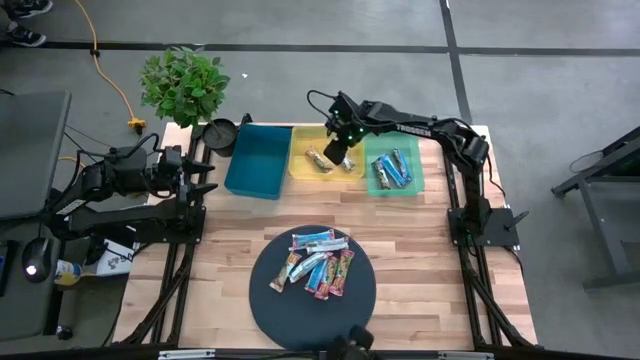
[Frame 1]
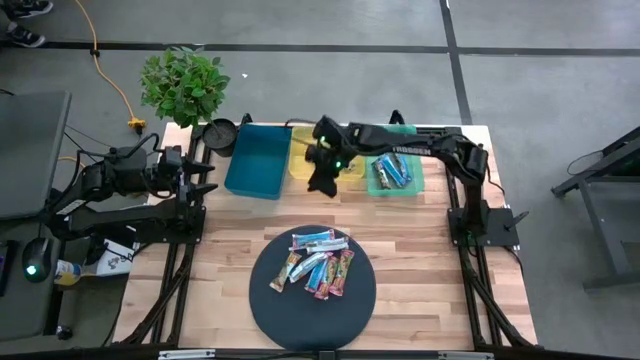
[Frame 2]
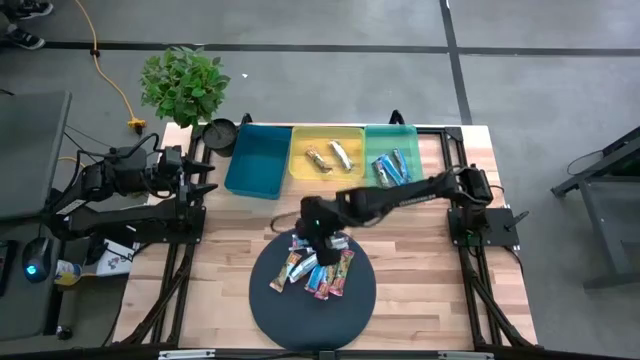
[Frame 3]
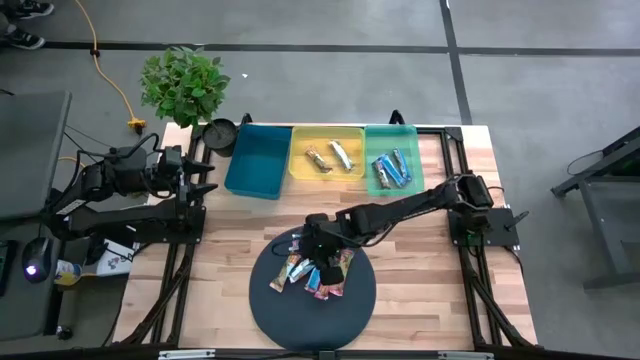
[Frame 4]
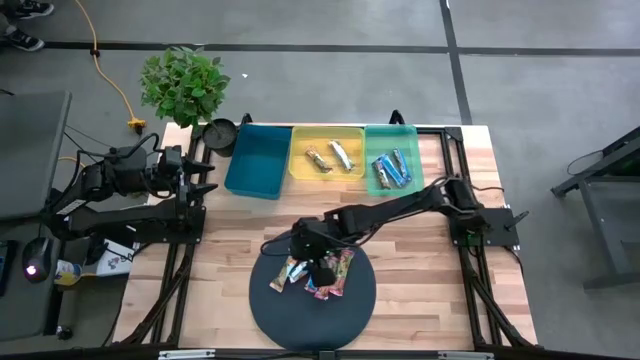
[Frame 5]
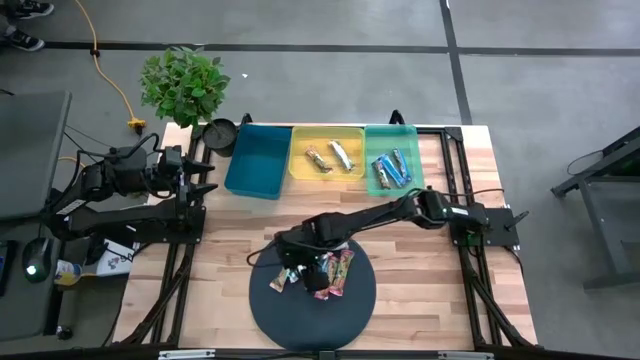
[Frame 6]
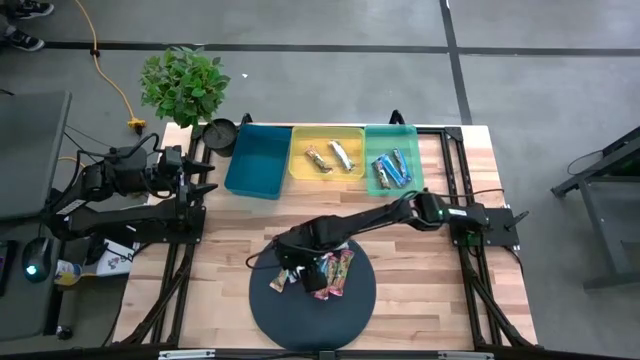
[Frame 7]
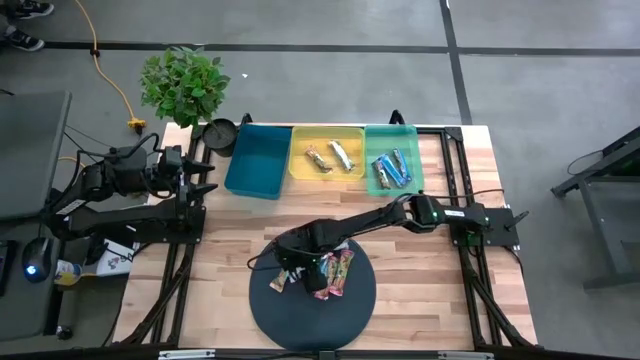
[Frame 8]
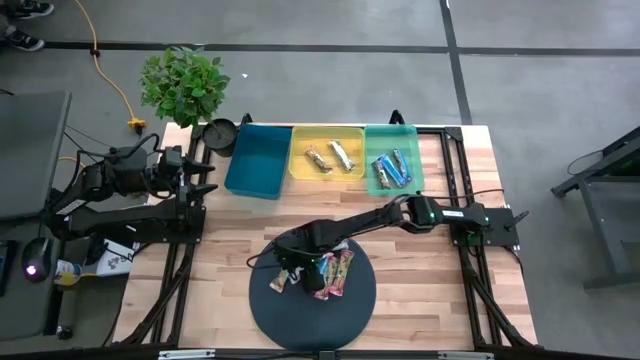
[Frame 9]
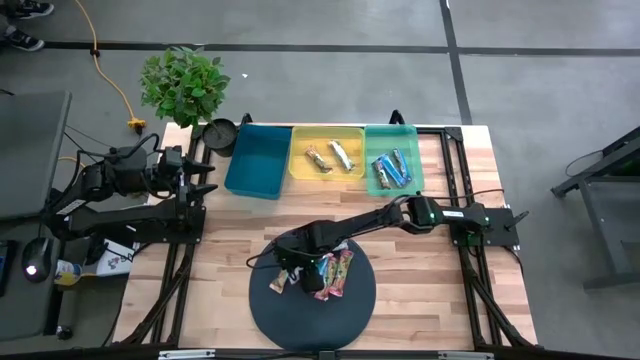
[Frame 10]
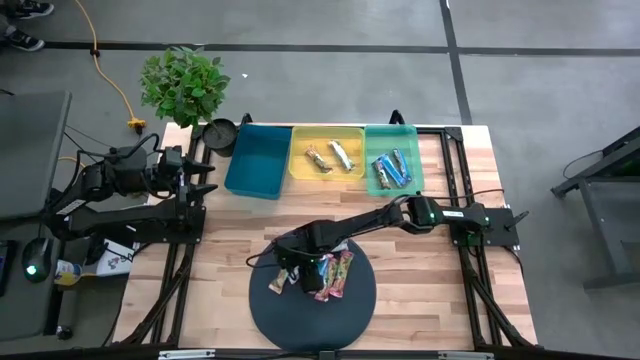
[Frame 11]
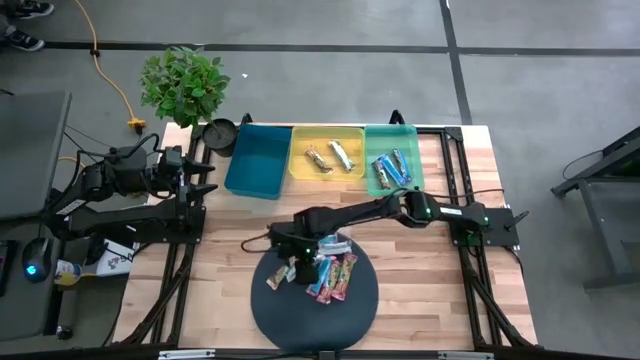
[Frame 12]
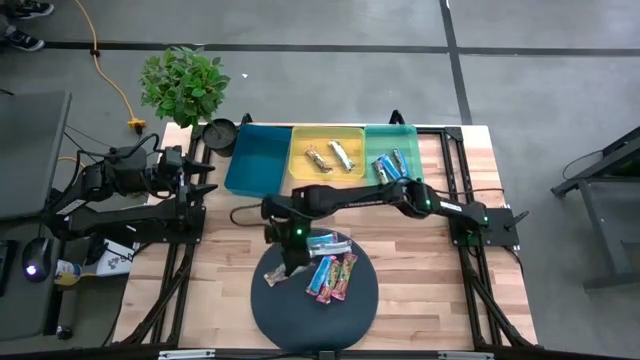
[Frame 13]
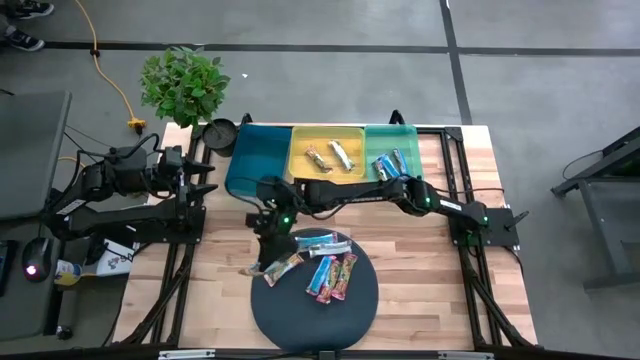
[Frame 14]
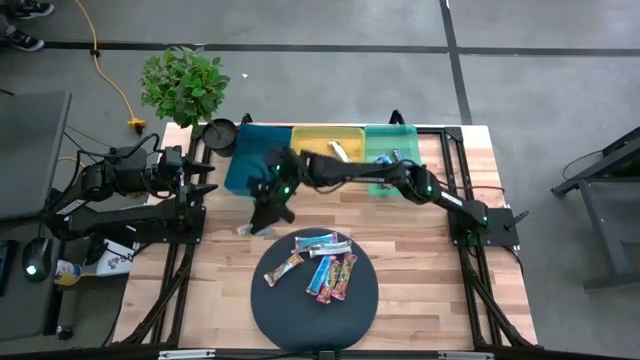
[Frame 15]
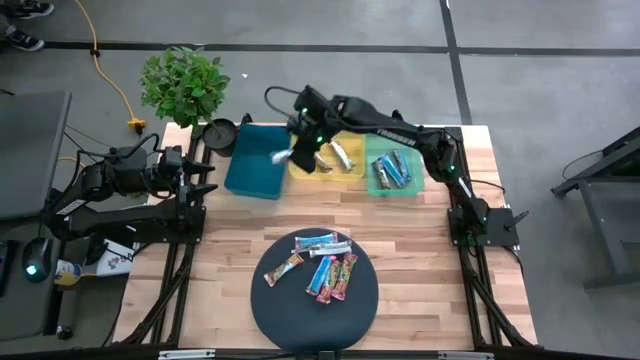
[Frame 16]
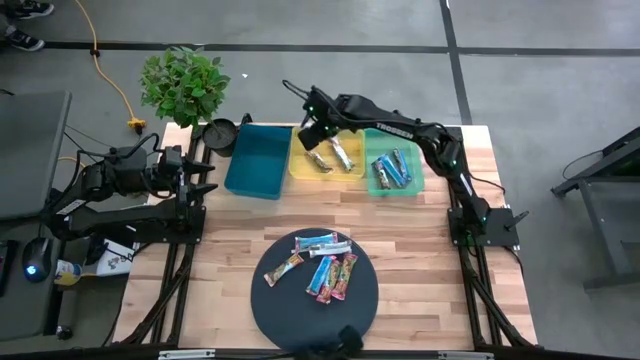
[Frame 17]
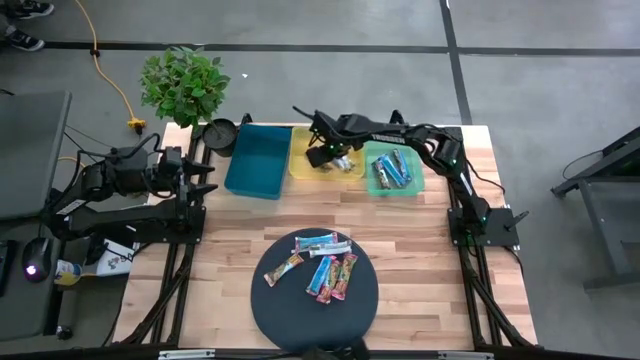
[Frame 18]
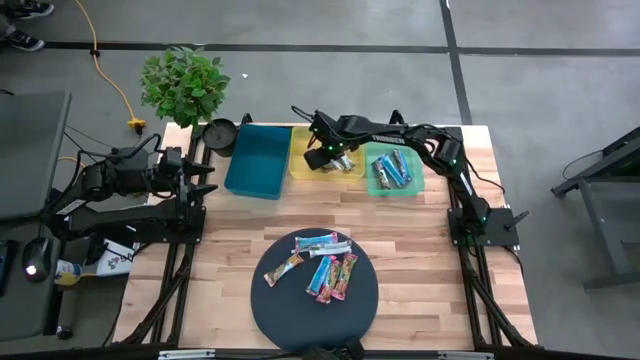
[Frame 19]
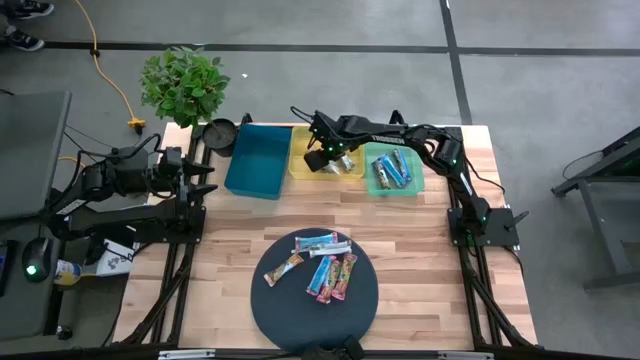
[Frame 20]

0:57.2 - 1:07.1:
Task: Pick and place Granola Bars by type
Put the yellow granola bar into the yellow bin

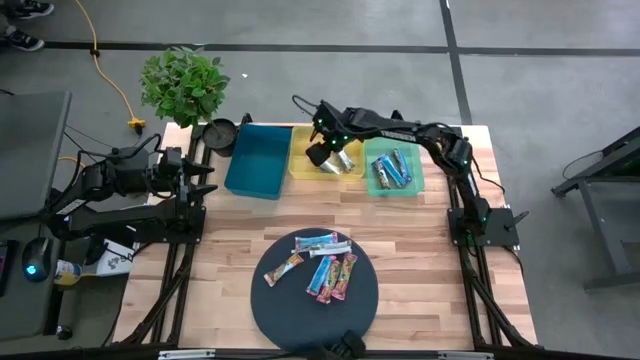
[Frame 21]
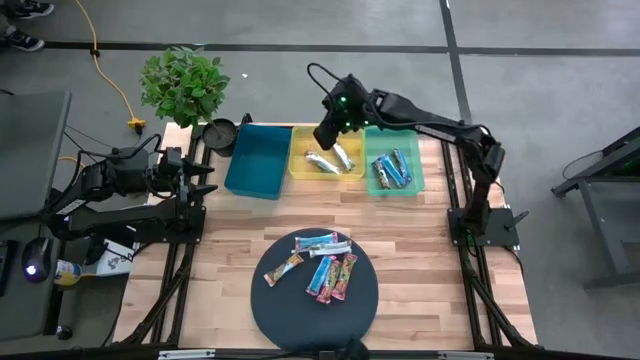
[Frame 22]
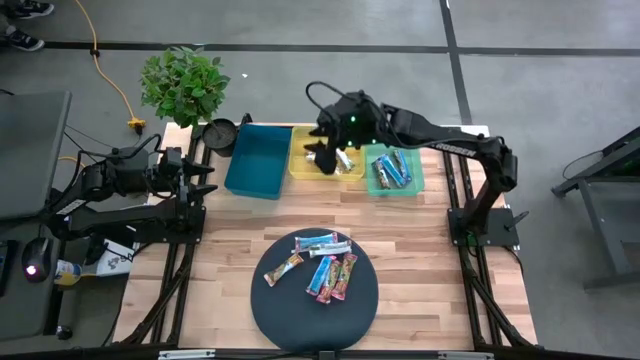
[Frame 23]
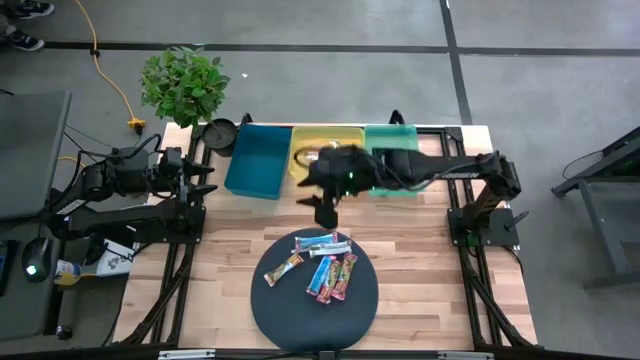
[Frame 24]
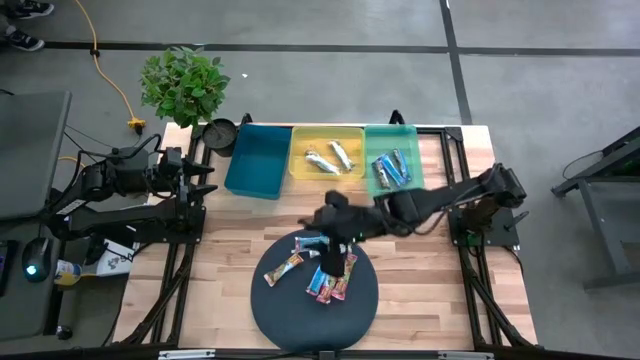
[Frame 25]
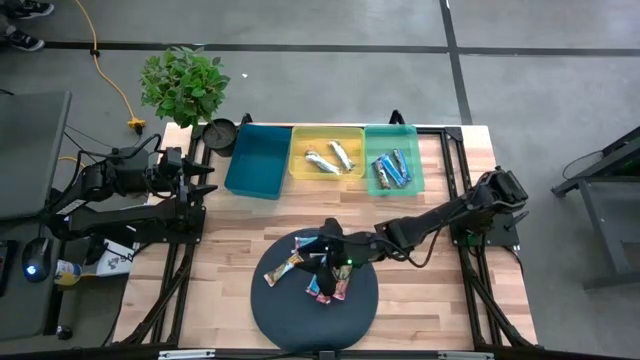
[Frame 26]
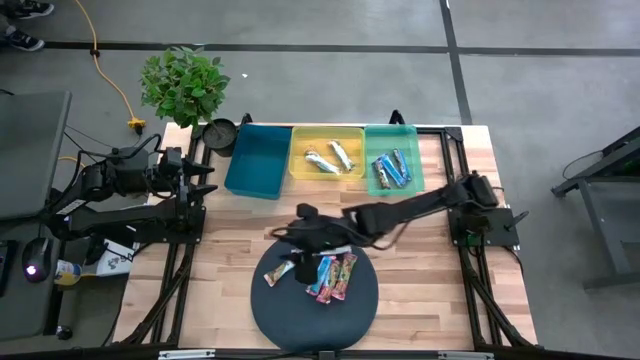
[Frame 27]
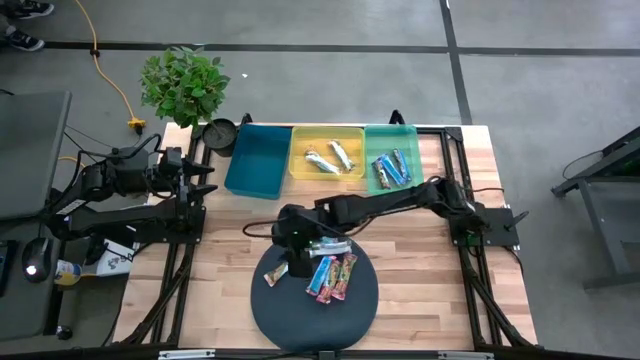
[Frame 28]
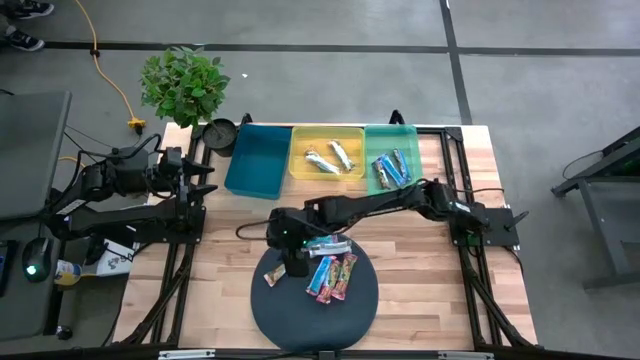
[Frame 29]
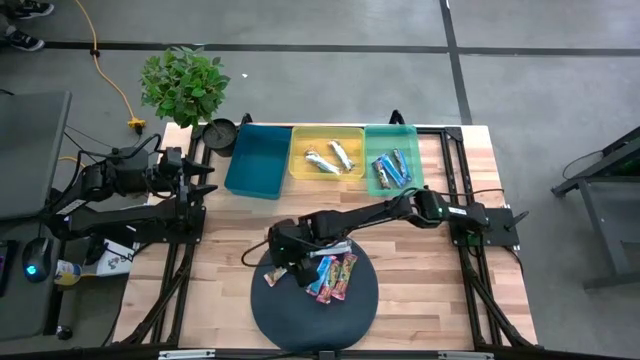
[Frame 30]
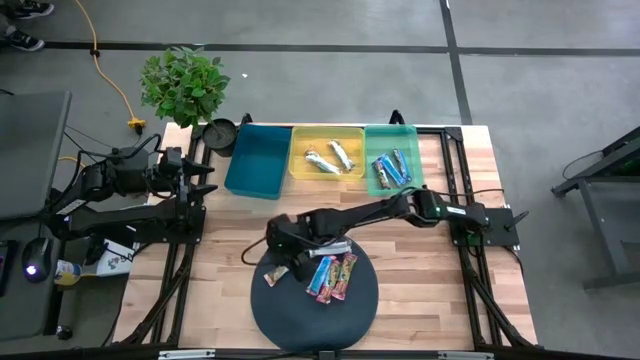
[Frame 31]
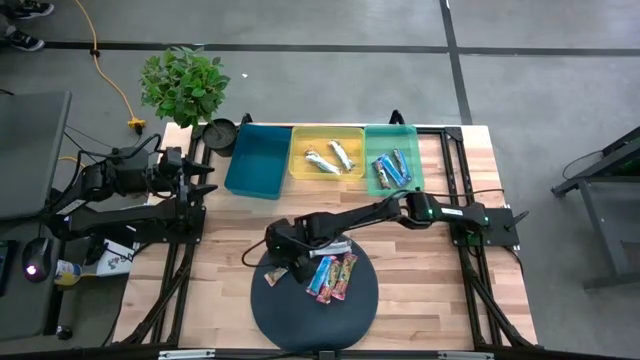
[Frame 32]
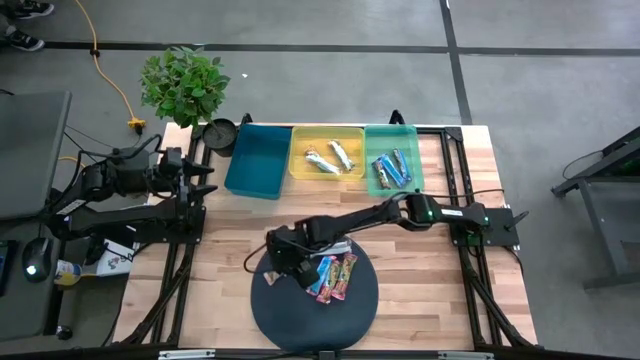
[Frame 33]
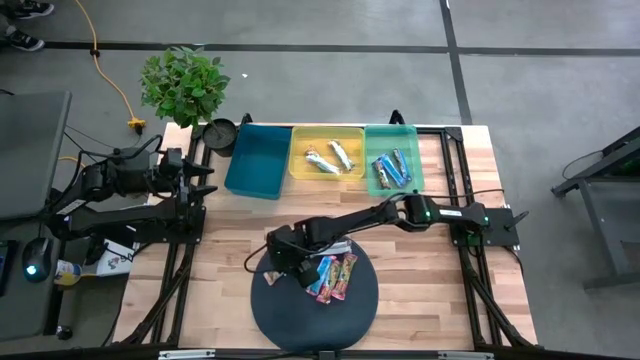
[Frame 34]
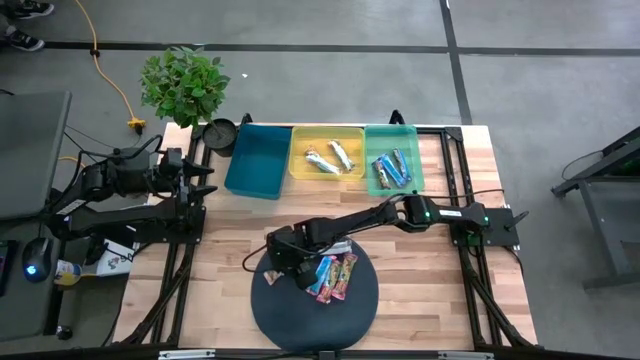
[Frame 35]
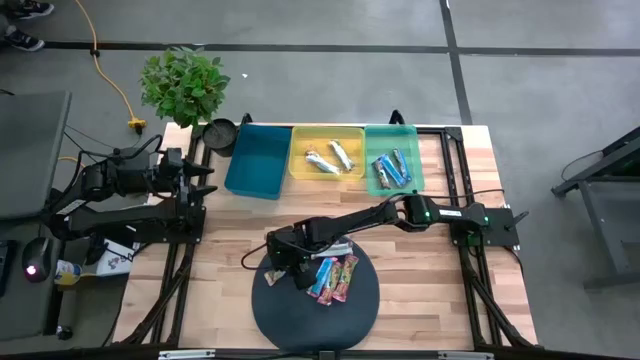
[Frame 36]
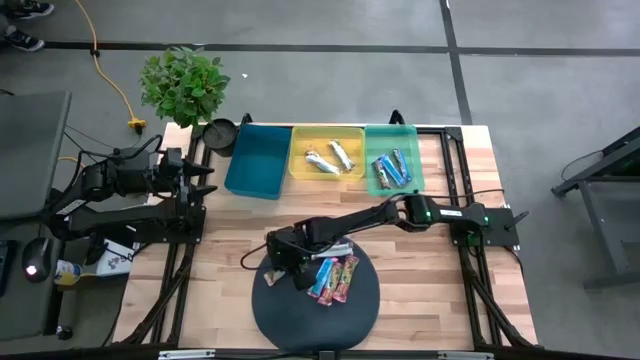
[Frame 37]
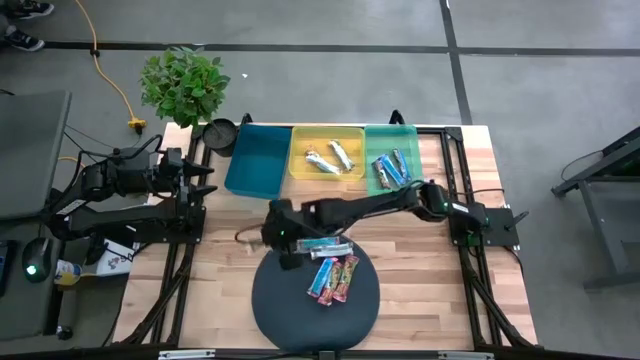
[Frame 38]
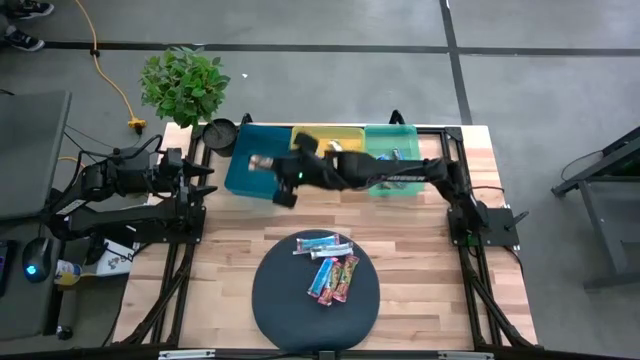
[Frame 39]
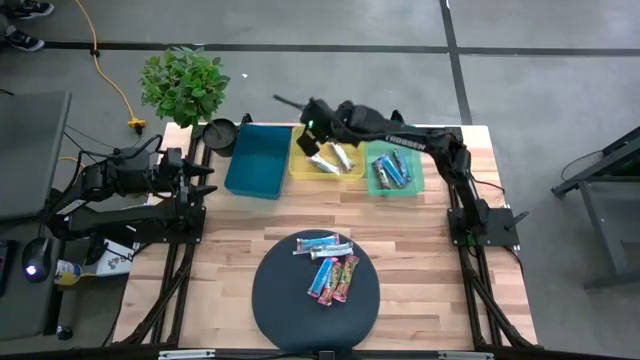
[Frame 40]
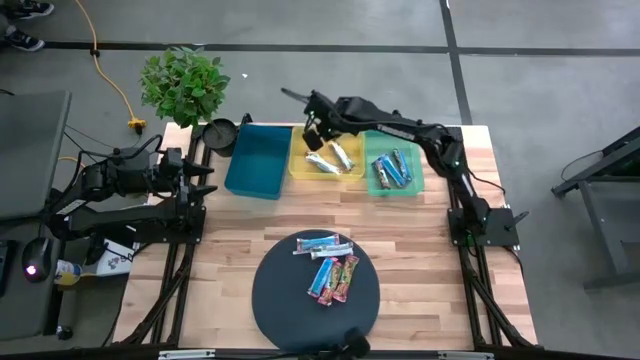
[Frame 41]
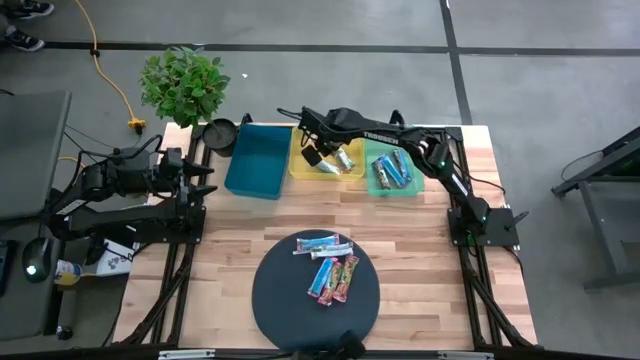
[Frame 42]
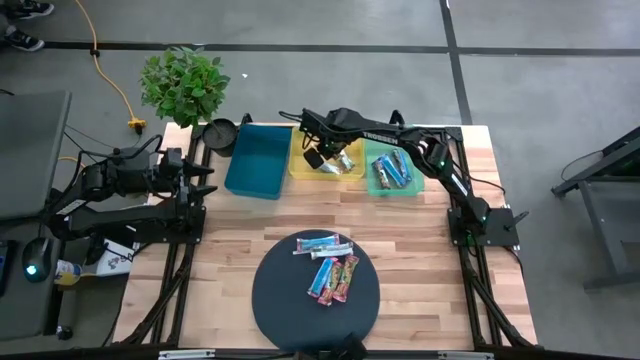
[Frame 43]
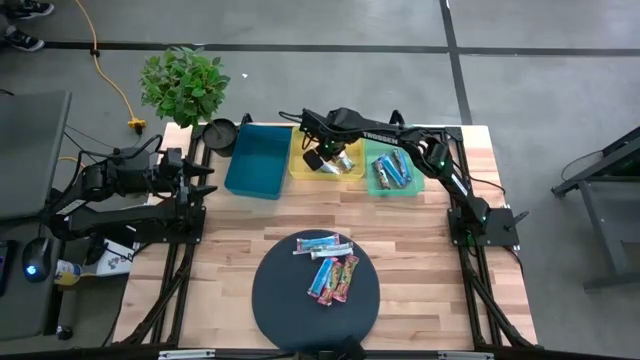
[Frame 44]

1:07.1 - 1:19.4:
Put the yellow granola bar into the yellow bin
